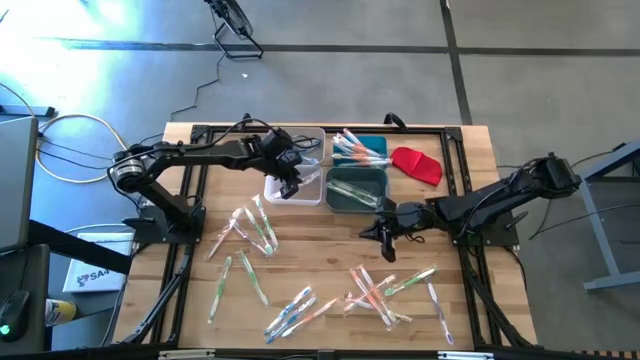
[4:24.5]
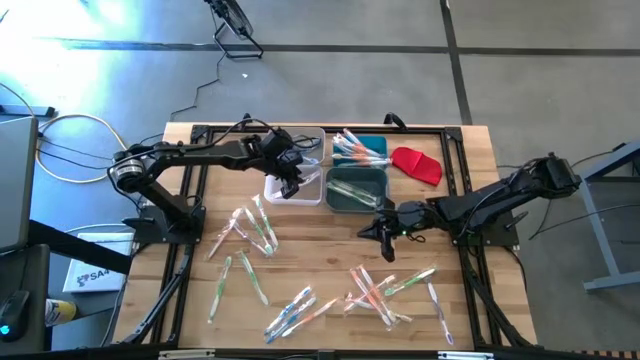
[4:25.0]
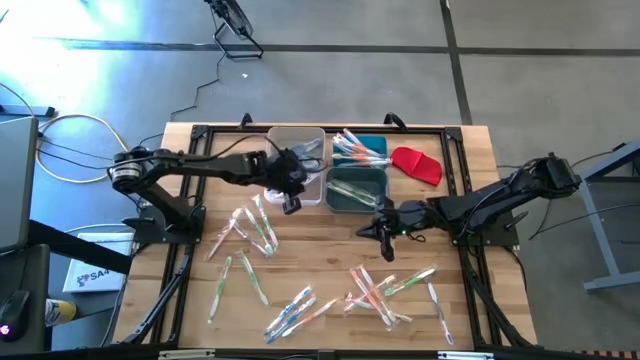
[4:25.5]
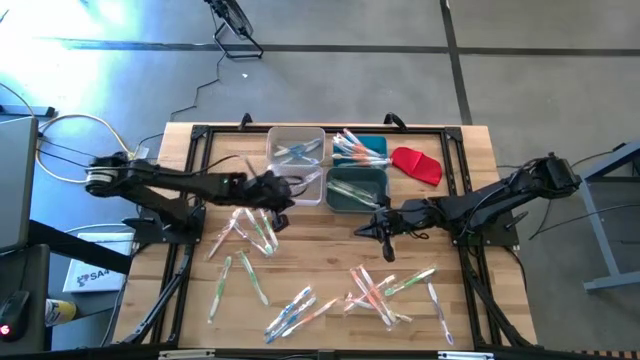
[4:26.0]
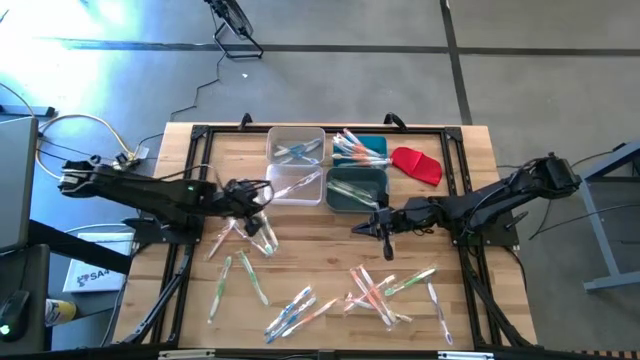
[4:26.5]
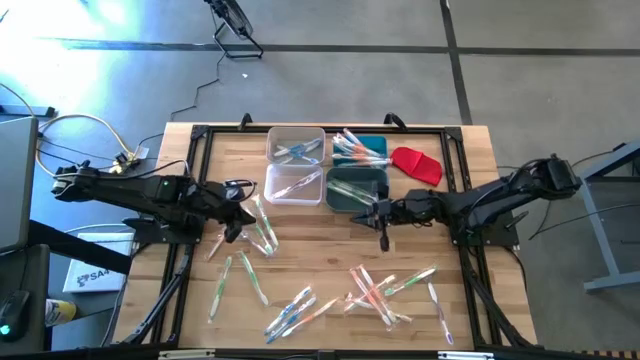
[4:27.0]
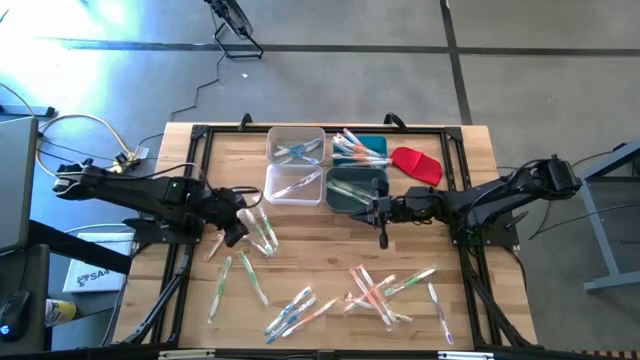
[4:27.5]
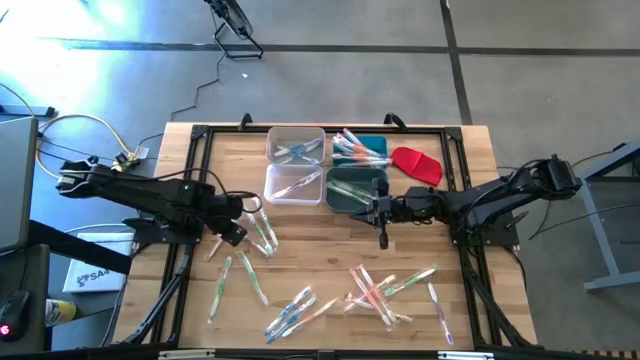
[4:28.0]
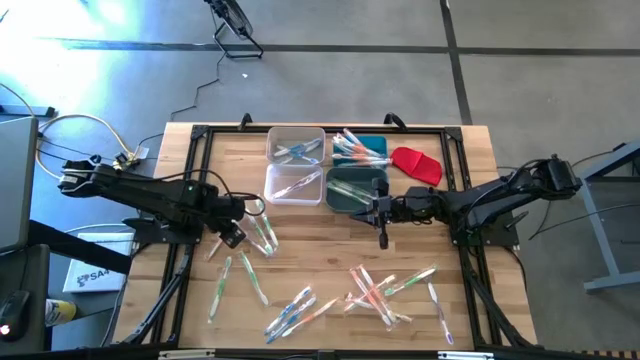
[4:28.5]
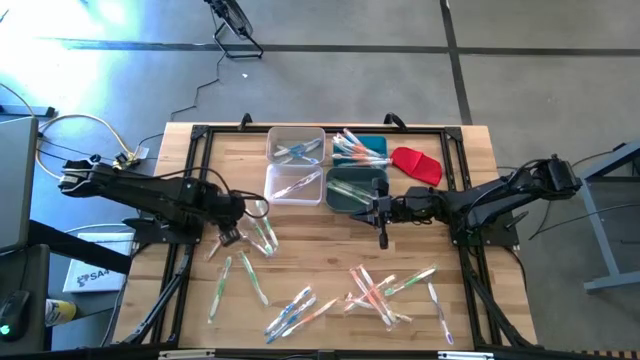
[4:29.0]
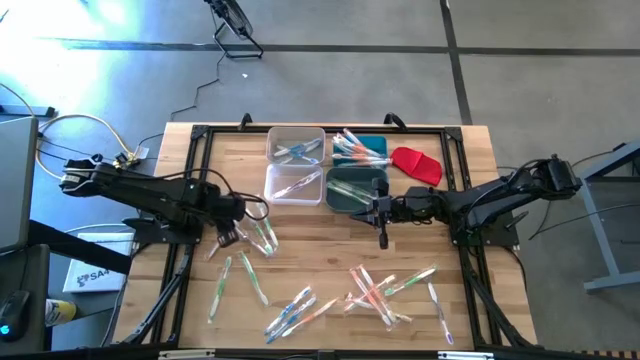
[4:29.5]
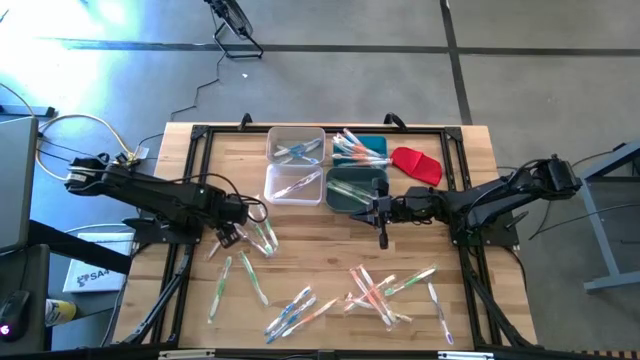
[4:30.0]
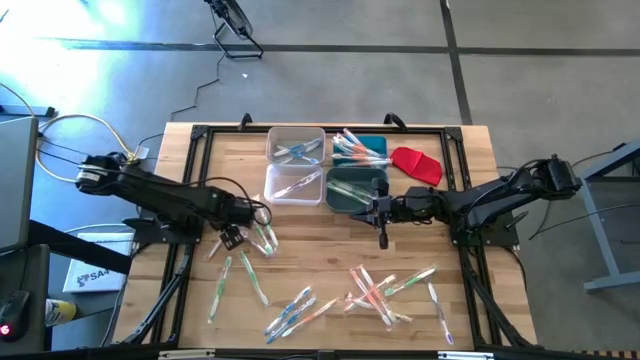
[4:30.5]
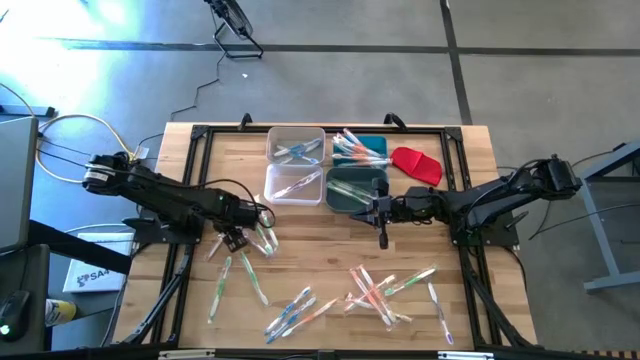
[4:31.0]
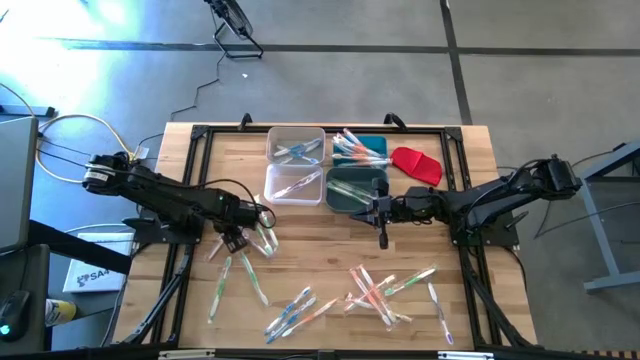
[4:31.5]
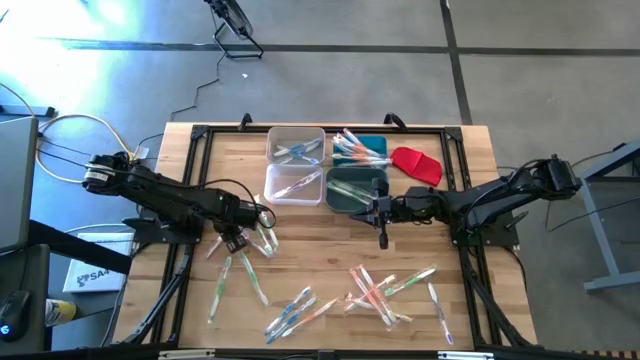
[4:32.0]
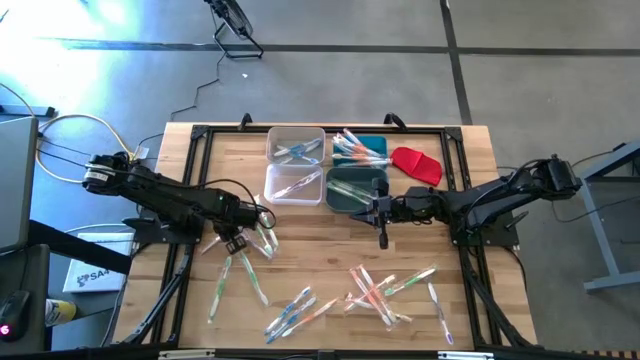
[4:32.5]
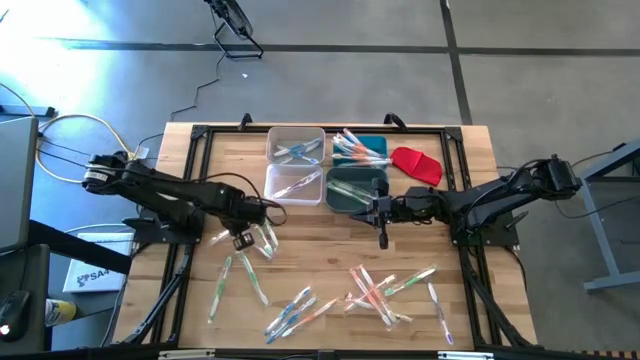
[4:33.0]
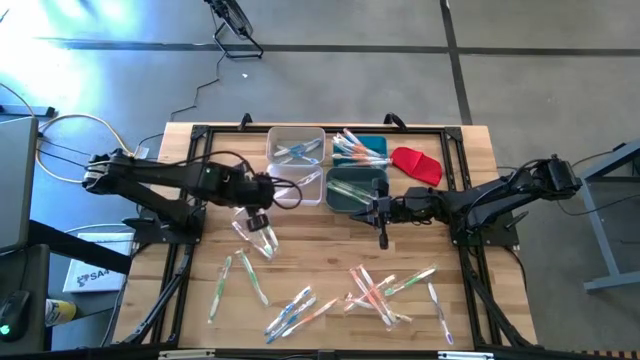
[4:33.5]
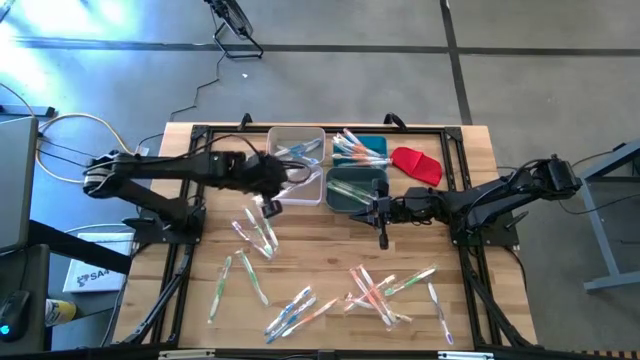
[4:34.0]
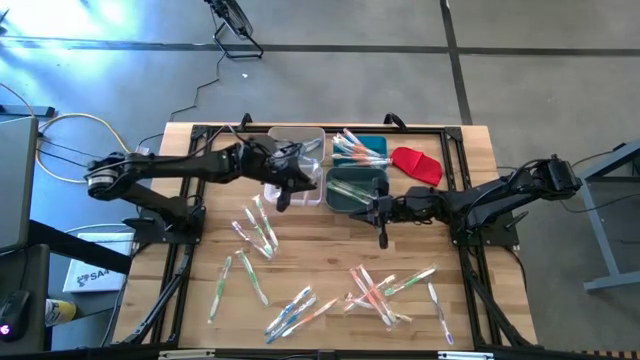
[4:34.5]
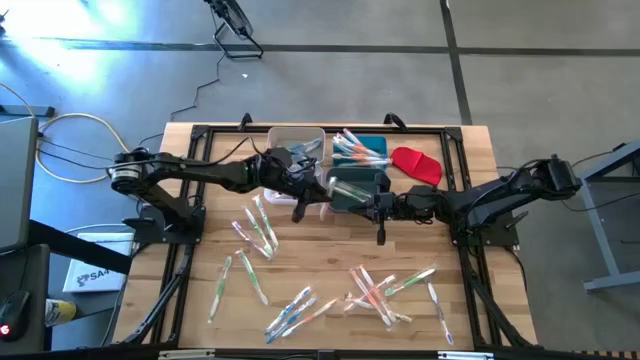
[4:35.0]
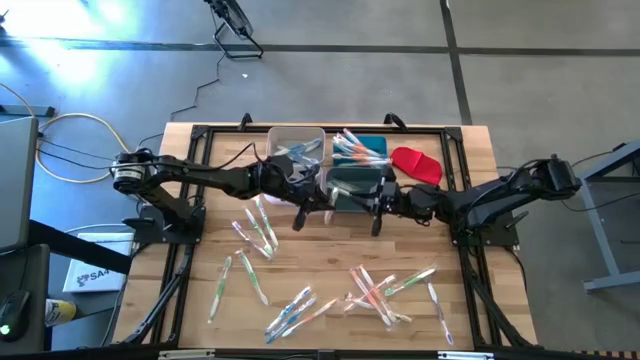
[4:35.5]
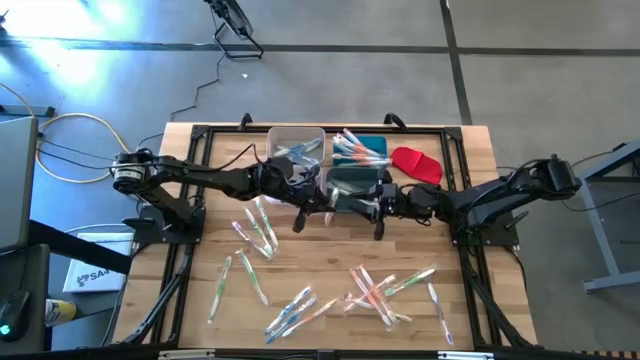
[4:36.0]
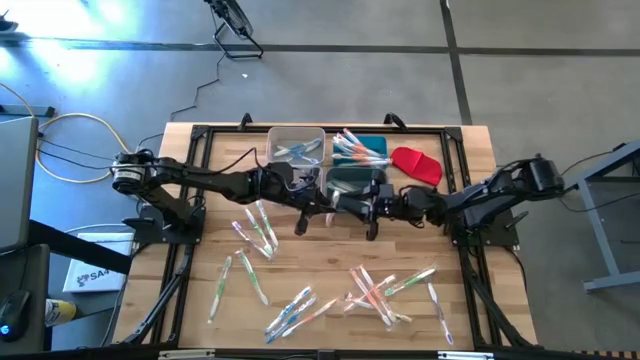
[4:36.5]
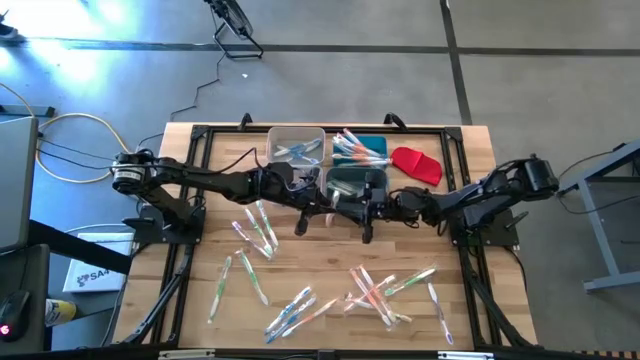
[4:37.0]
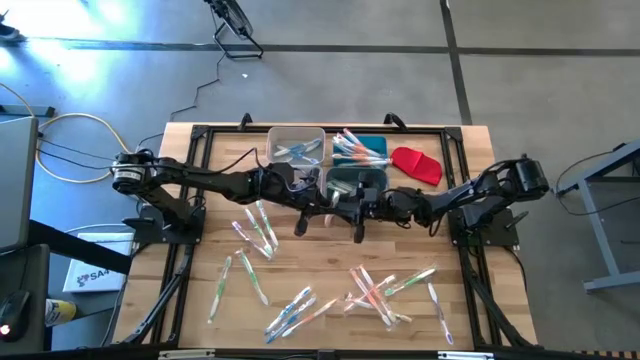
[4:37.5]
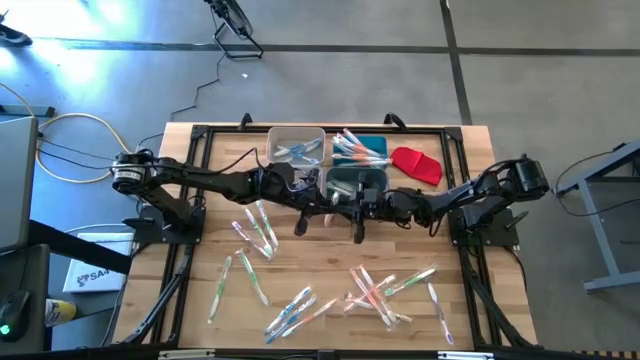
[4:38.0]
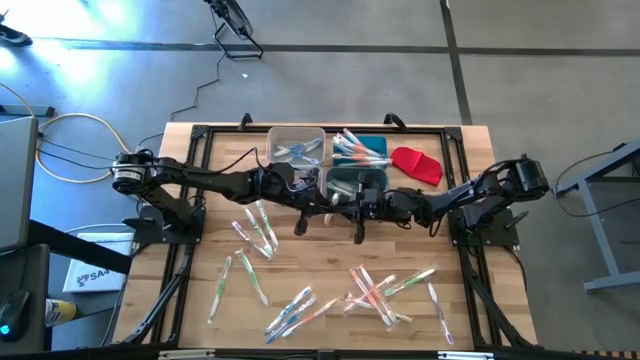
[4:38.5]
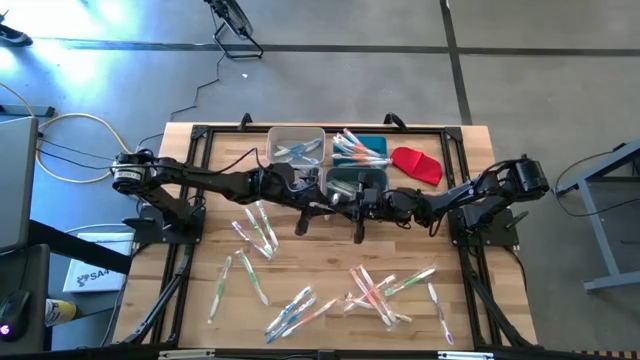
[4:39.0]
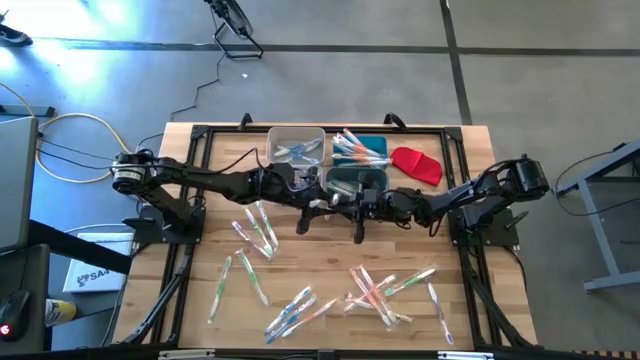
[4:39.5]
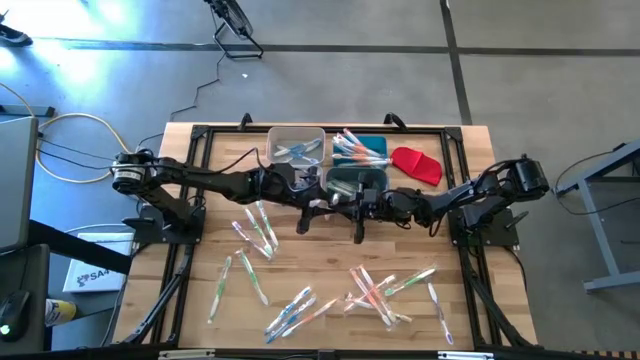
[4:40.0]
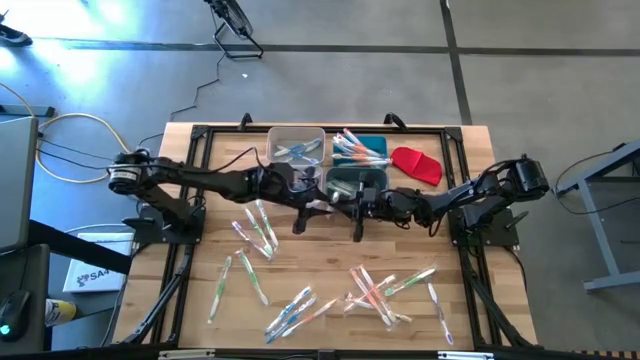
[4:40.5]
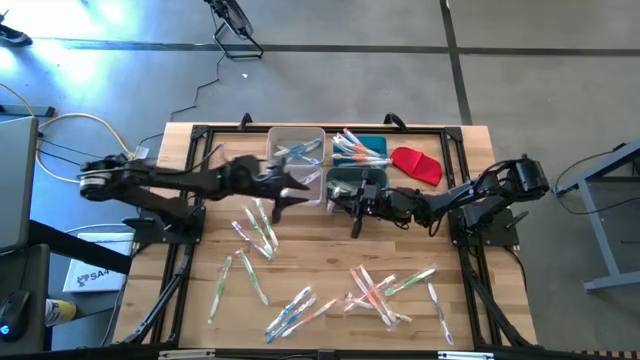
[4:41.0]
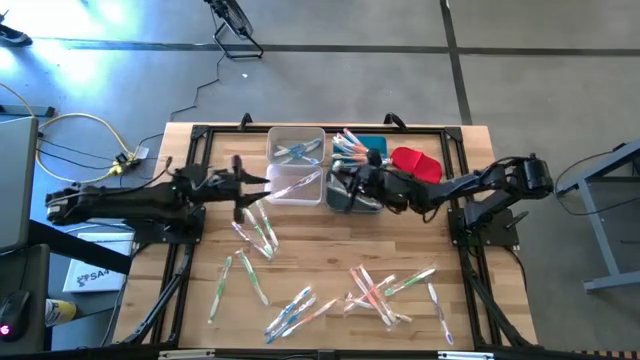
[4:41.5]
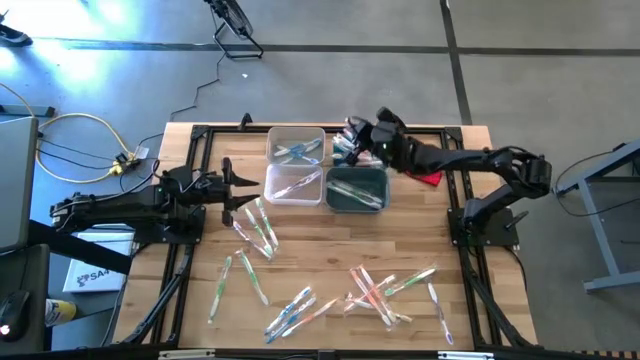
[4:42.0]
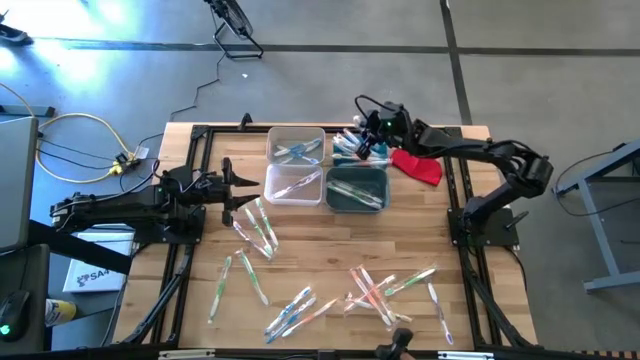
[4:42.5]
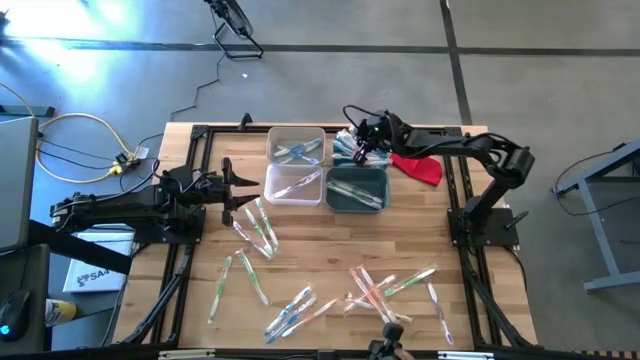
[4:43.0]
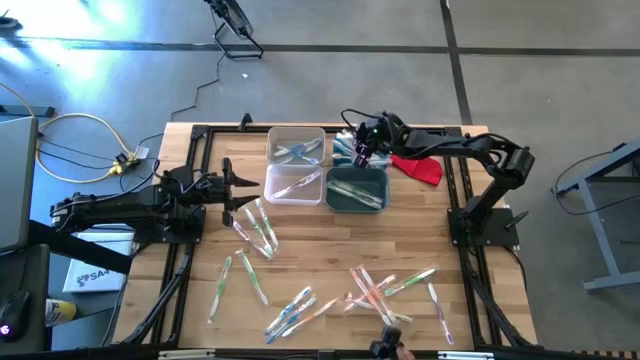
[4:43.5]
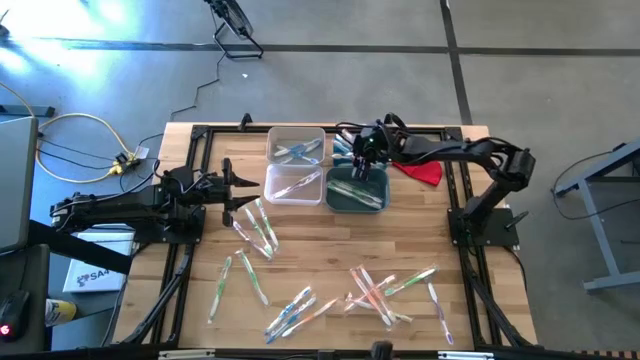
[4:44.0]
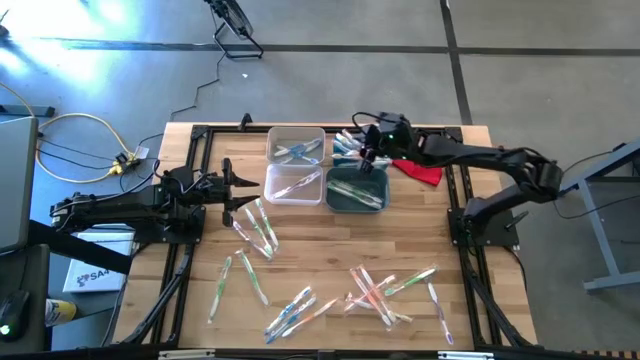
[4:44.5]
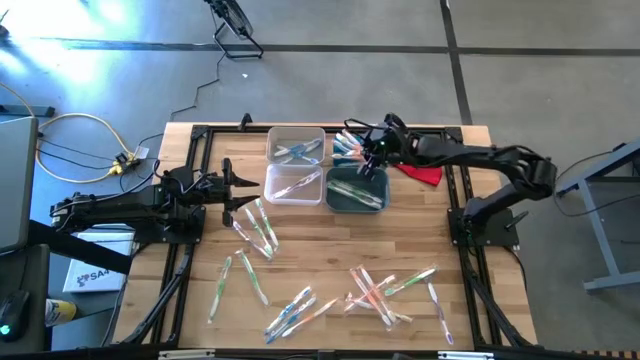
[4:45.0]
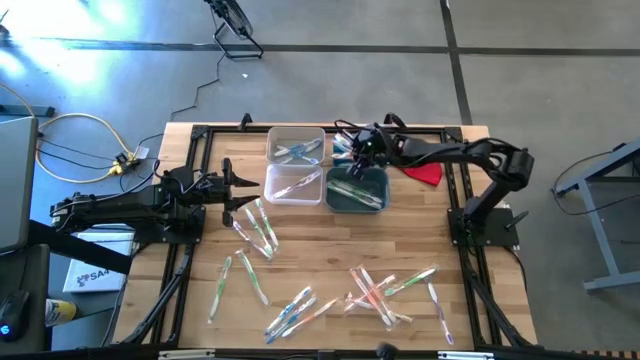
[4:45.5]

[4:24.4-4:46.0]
Task: Pick & Place Toothbrushes
Put the orange toothbrush into the blue bin
